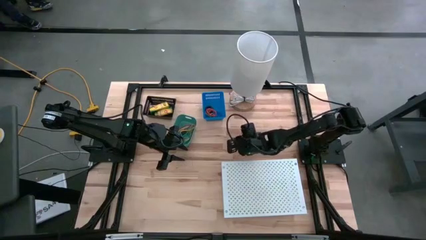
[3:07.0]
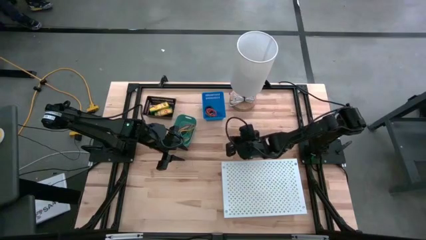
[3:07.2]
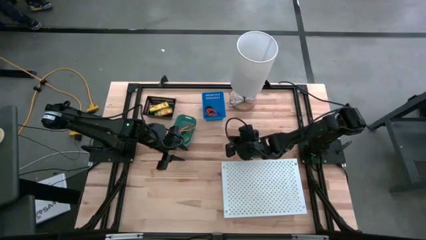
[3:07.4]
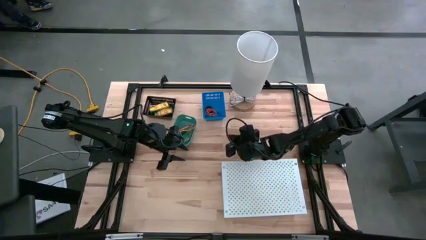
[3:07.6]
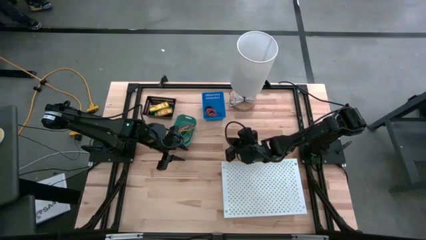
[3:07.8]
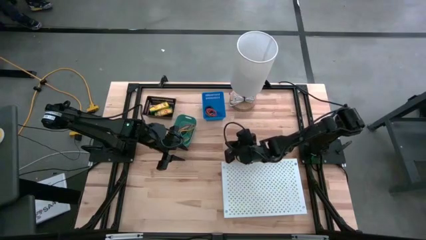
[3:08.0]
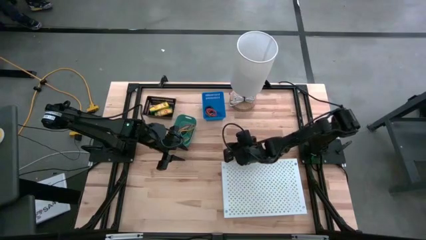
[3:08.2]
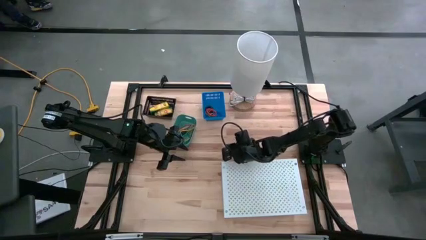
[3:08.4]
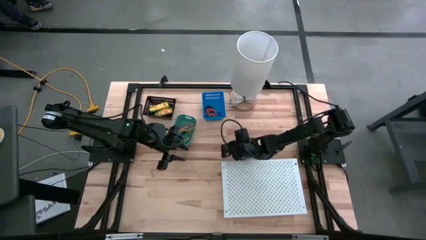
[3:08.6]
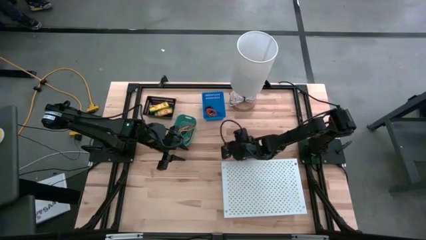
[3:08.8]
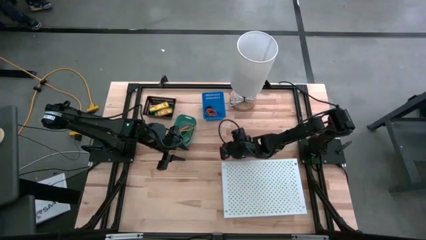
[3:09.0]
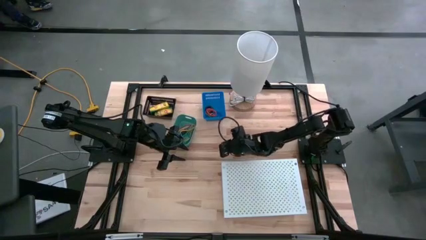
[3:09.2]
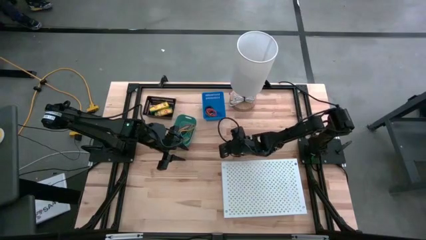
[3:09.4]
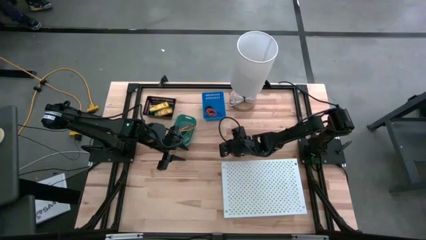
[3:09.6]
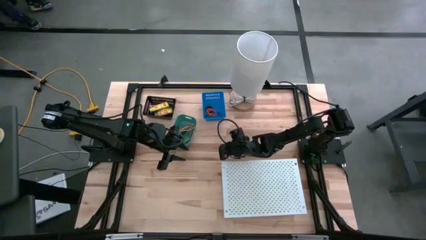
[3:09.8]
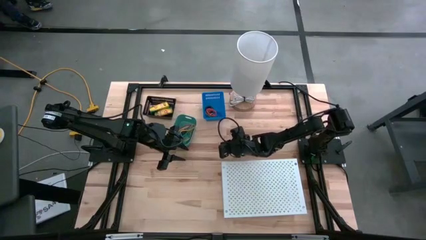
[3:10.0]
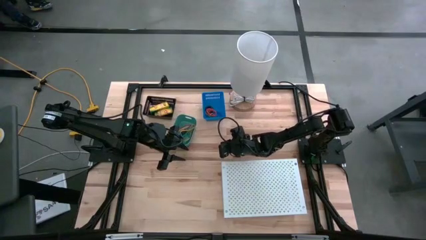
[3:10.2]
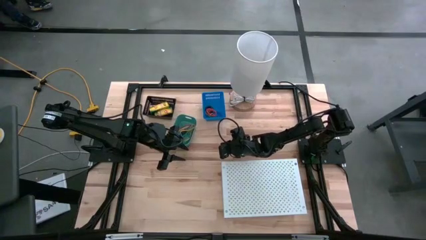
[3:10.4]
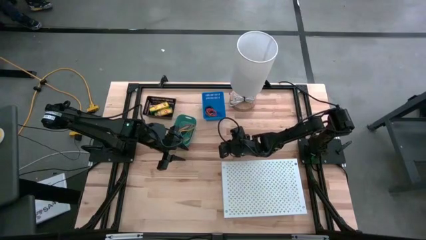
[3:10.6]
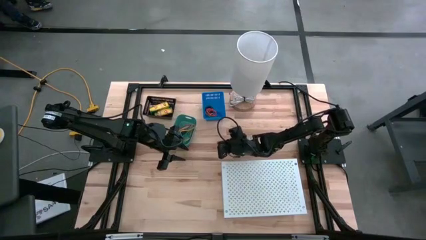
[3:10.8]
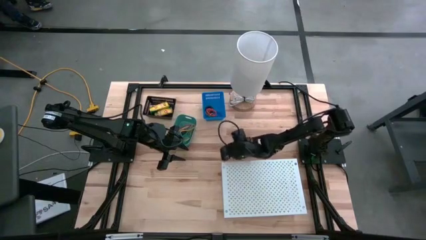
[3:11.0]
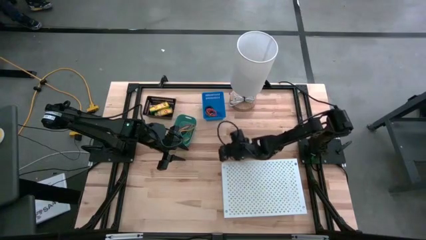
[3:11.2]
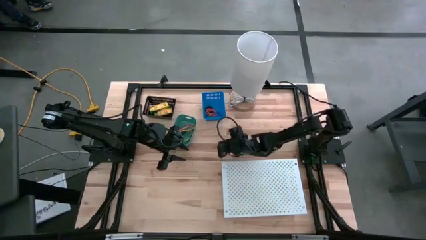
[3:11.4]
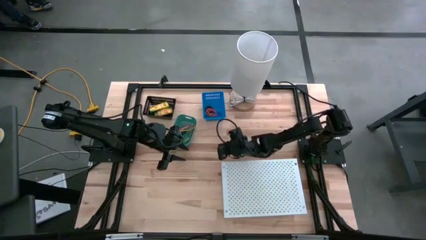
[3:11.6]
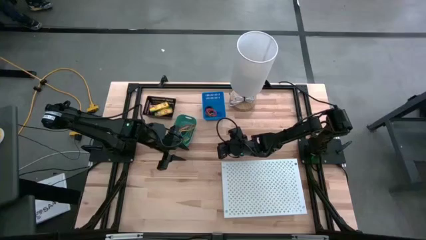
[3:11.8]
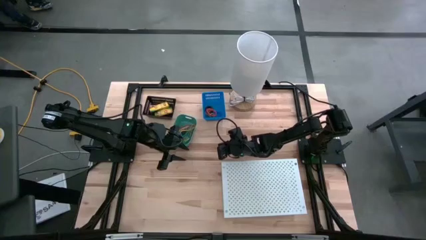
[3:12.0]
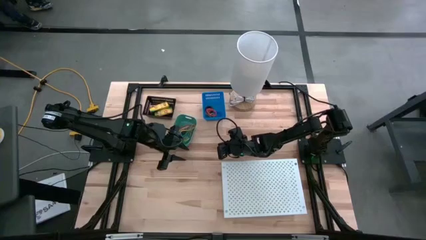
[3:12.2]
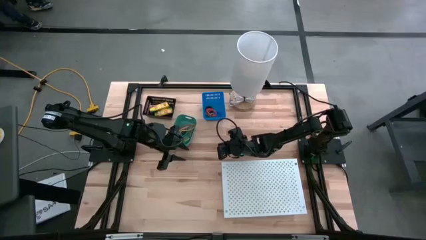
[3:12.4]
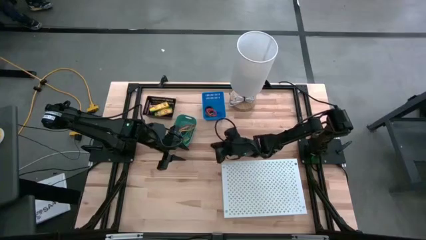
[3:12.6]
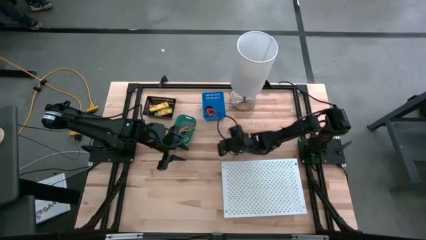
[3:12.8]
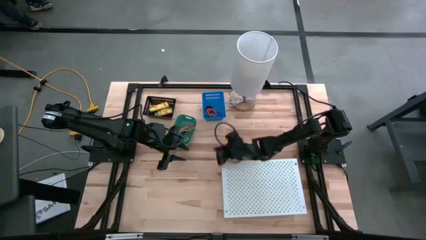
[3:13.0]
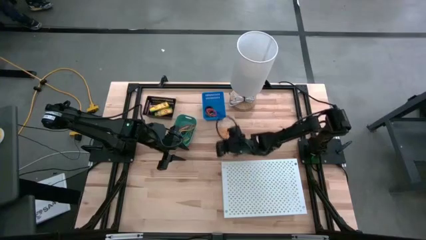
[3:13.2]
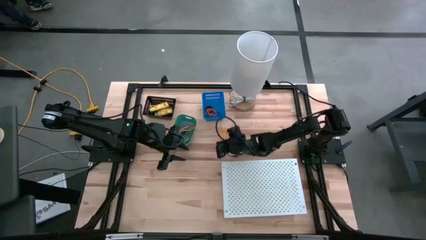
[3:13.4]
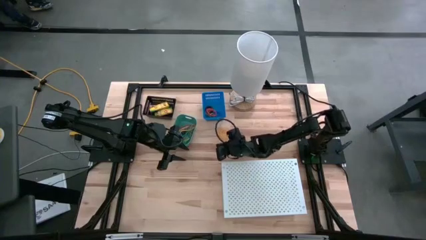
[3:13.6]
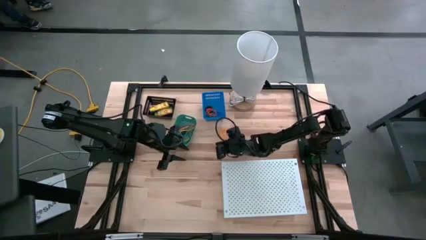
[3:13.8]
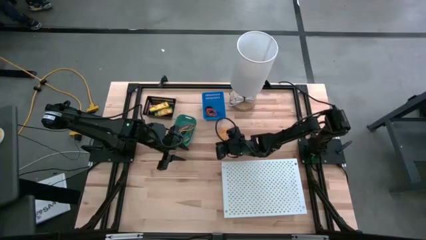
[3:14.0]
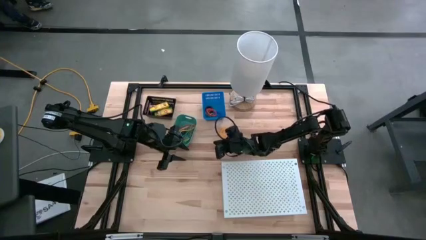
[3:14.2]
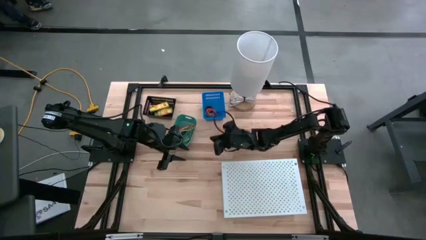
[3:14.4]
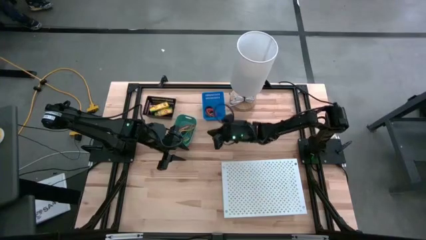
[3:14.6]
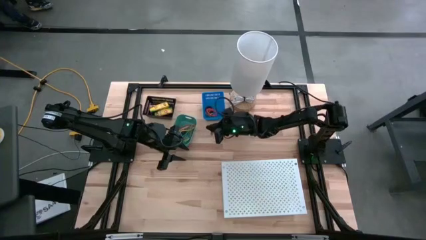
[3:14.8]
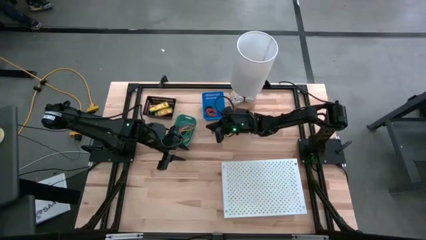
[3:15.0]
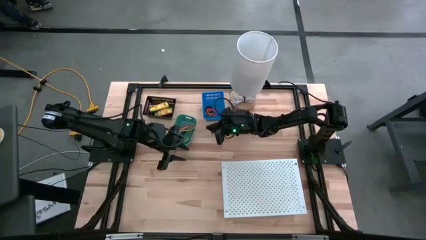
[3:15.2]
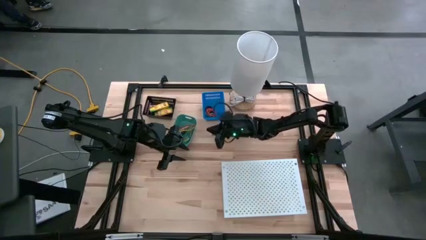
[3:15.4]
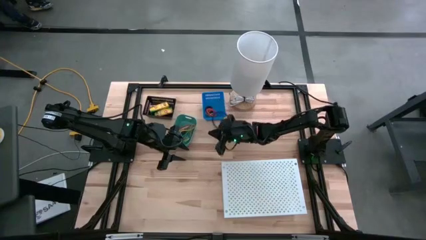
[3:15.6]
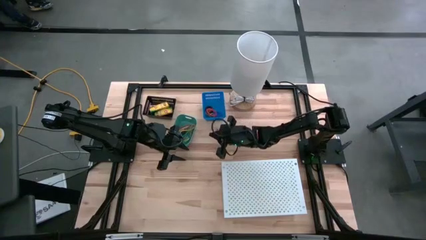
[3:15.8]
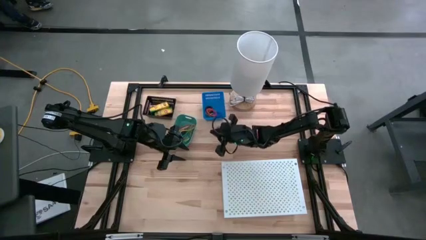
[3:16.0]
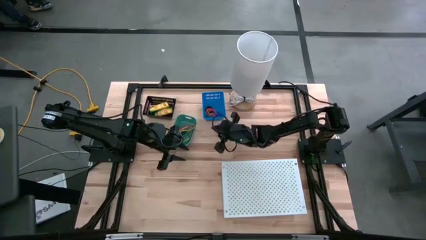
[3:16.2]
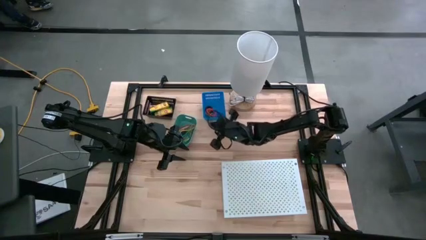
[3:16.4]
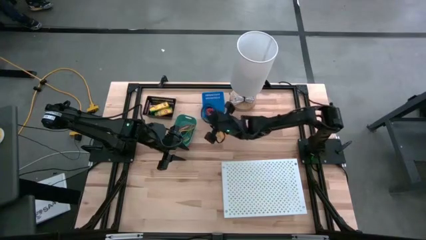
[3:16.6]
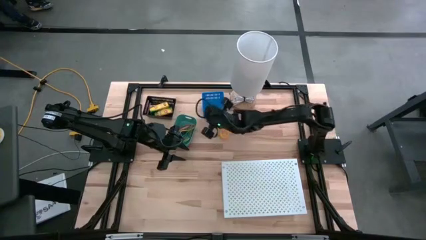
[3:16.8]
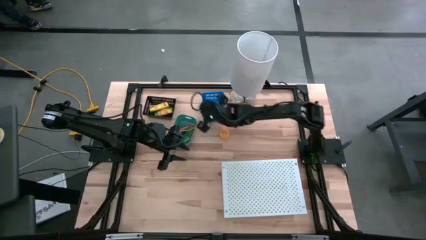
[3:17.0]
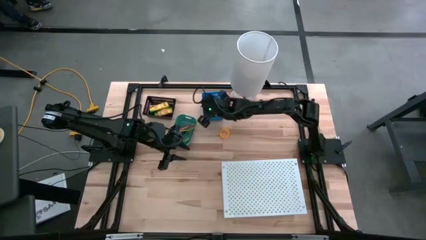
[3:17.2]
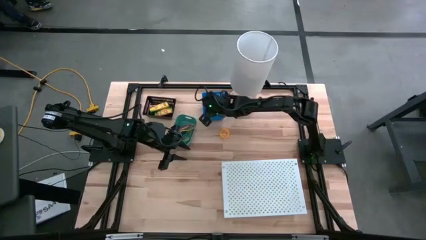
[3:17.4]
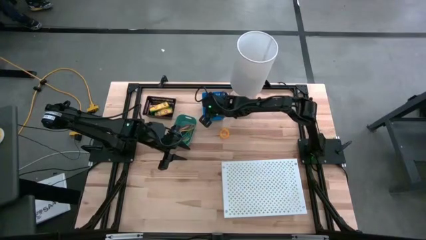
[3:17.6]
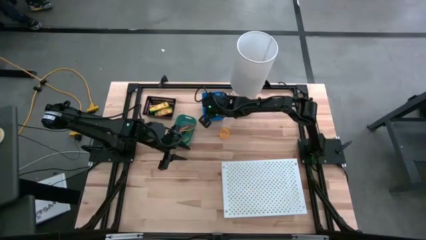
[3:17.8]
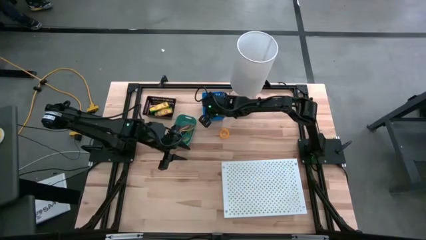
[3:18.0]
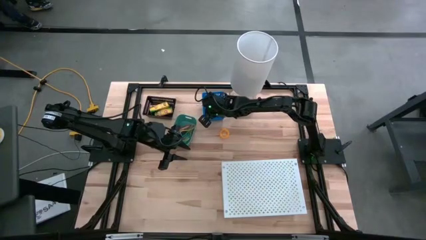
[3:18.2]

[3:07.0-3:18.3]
Task: Pick & Place Office Desk Supplies
Put the purple spring keychain into the blue bin

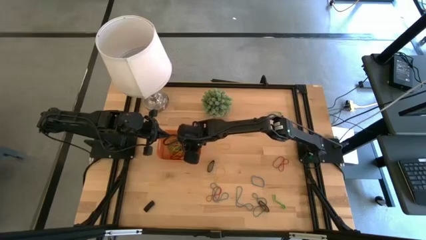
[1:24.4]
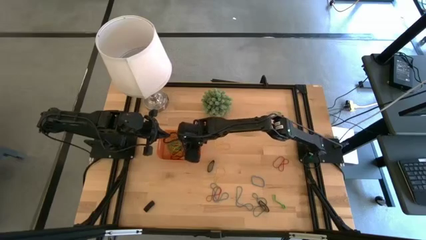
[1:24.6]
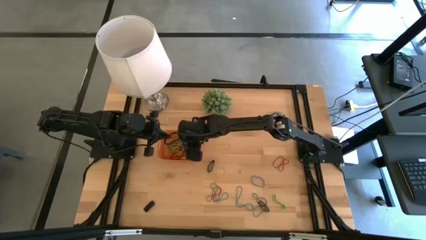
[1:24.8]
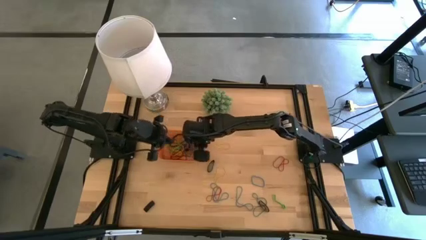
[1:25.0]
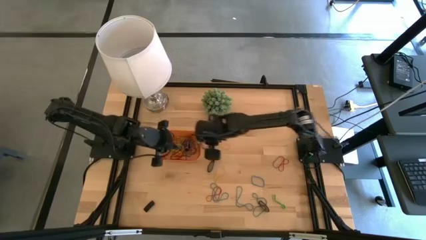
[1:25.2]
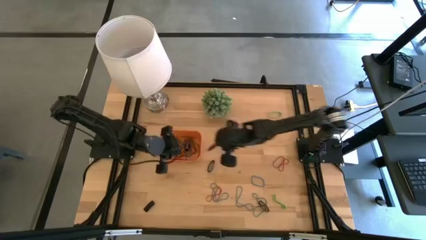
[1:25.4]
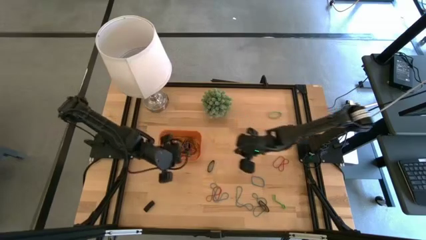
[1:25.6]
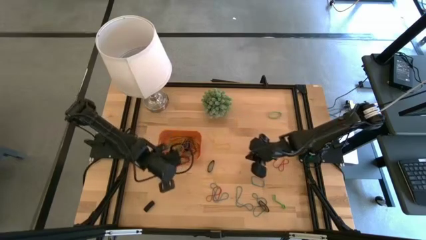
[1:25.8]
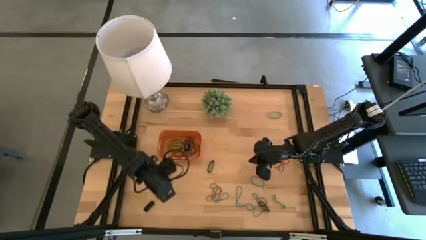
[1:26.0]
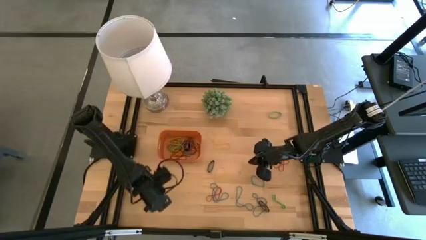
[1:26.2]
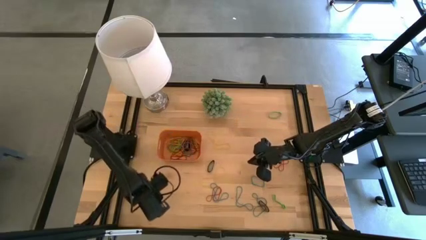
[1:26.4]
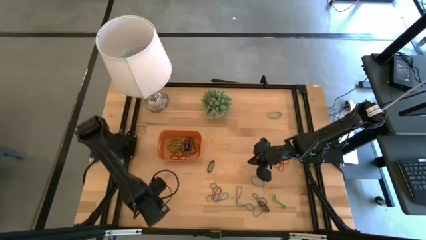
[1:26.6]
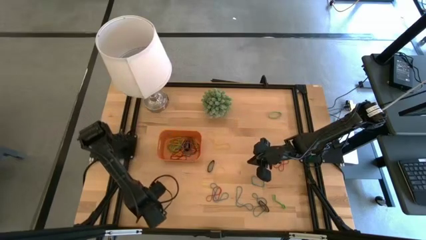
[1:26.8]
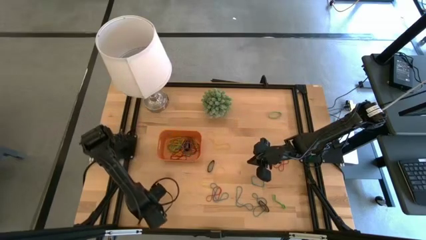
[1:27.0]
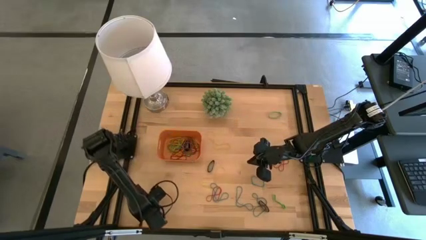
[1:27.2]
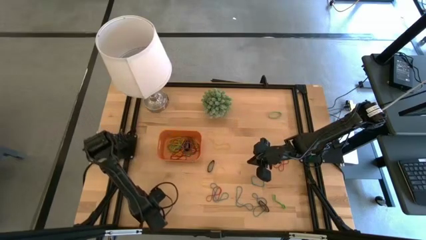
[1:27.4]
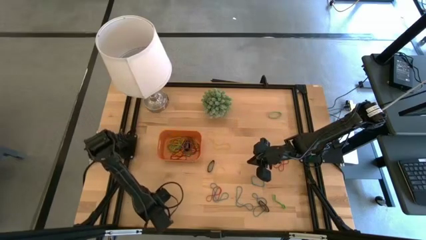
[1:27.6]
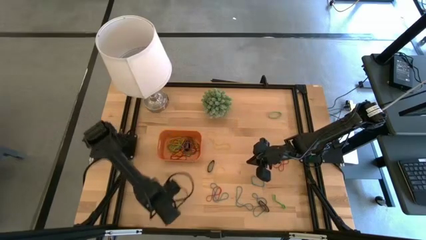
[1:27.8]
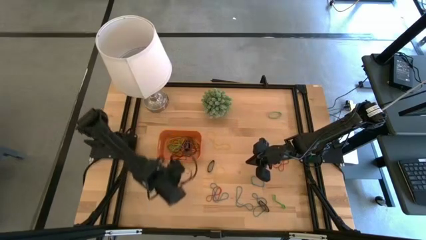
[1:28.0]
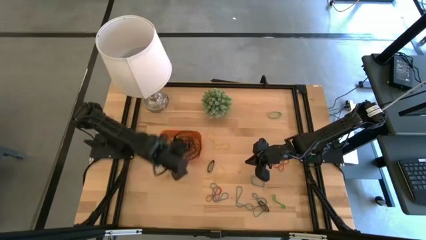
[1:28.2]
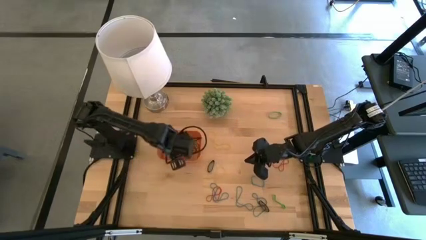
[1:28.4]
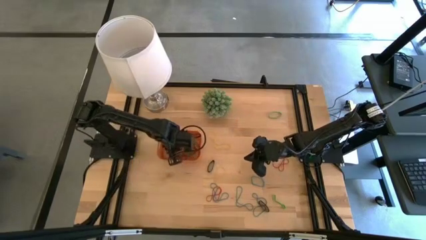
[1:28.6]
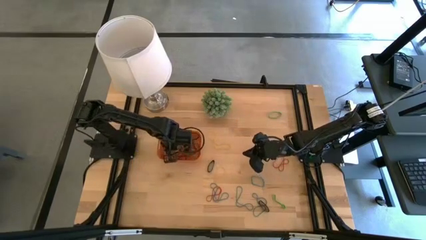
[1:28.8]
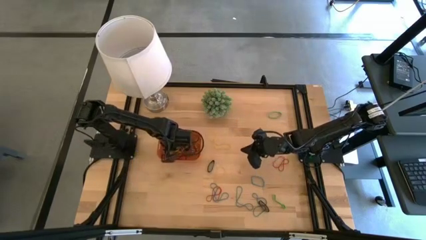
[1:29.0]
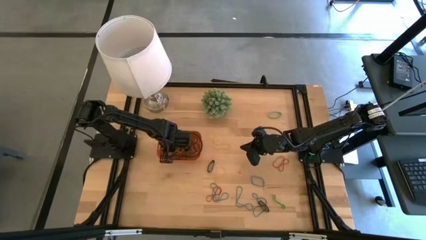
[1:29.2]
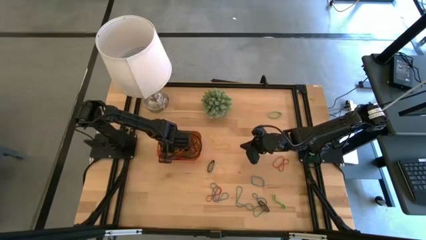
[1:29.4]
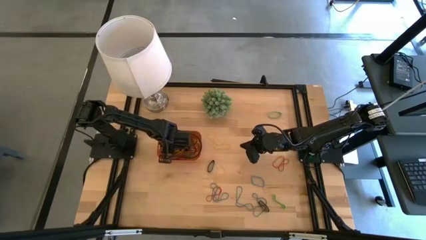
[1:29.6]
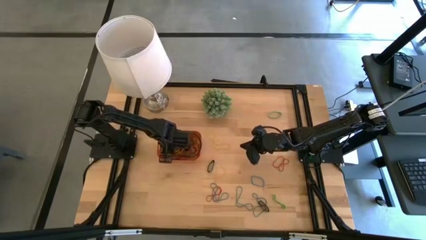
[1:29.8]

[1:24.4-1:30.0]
Task: Pick and place rubber bands into bin
Put the black rubber band into the orange bin
